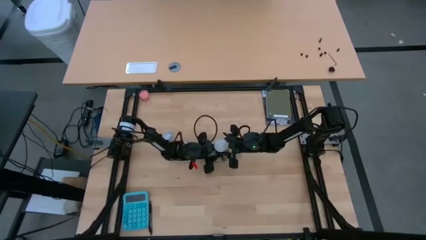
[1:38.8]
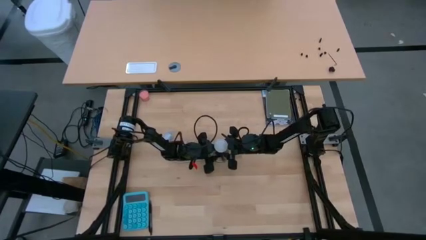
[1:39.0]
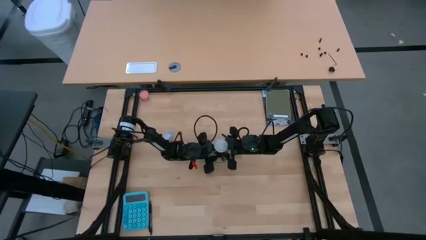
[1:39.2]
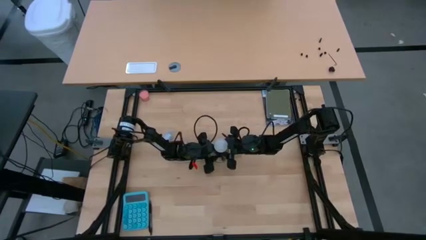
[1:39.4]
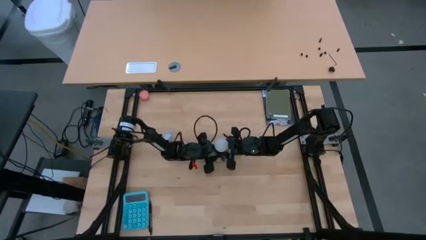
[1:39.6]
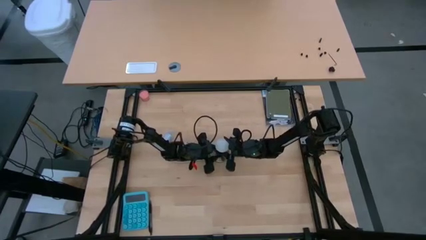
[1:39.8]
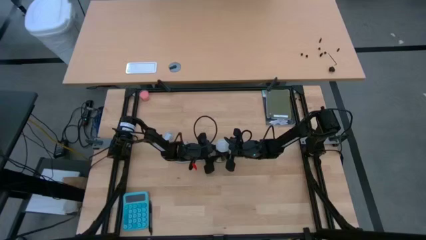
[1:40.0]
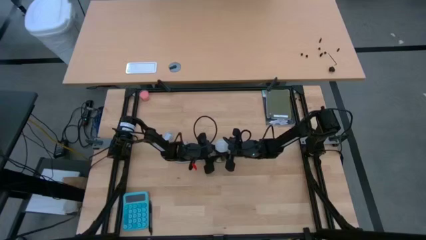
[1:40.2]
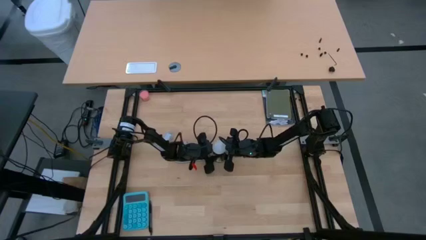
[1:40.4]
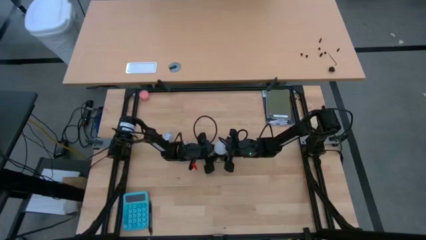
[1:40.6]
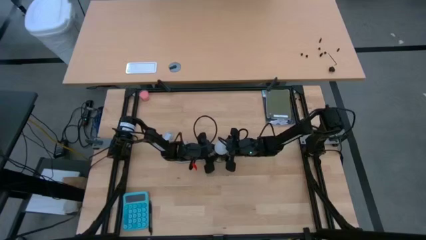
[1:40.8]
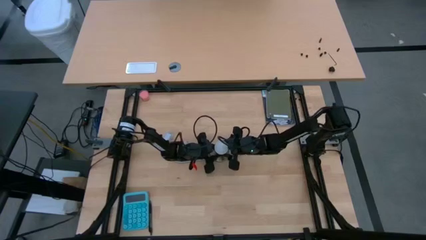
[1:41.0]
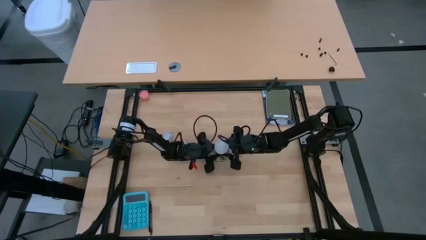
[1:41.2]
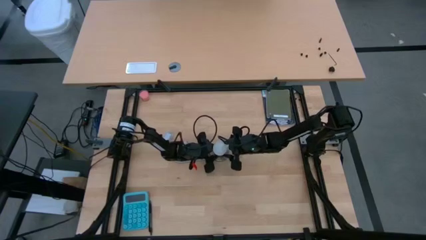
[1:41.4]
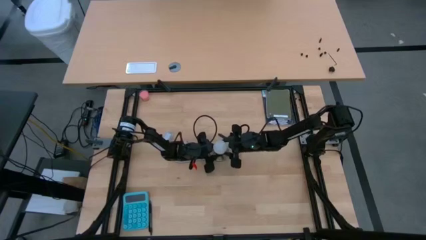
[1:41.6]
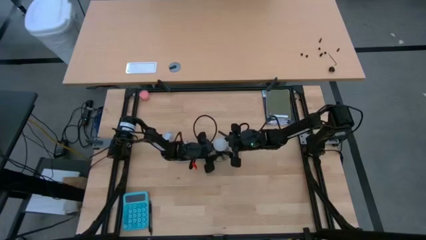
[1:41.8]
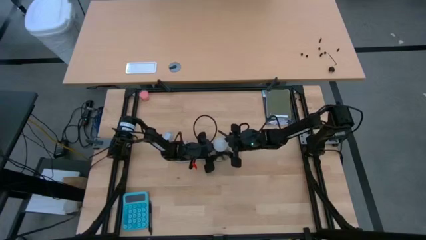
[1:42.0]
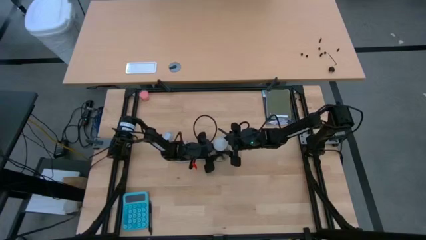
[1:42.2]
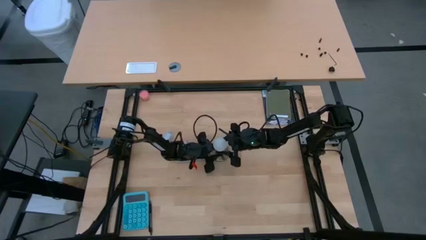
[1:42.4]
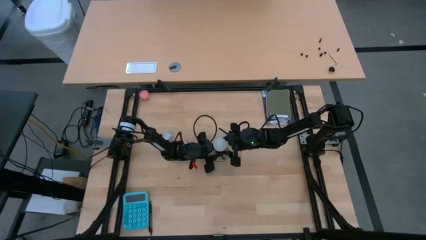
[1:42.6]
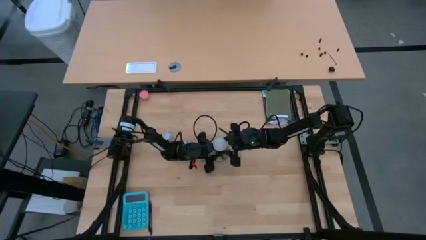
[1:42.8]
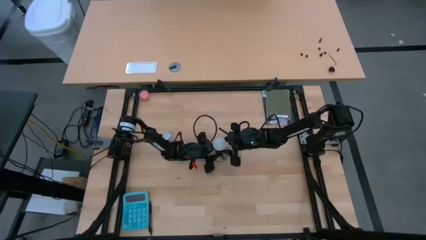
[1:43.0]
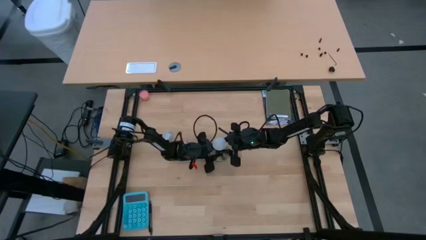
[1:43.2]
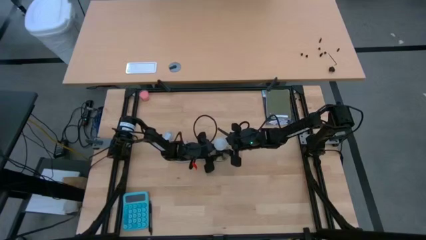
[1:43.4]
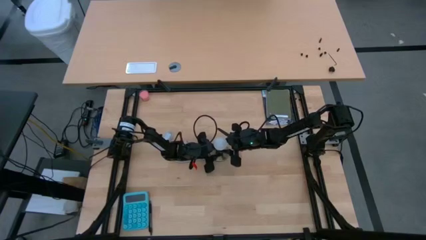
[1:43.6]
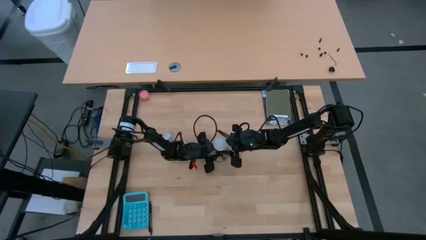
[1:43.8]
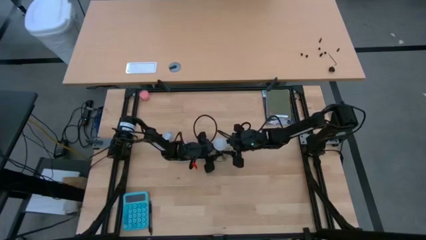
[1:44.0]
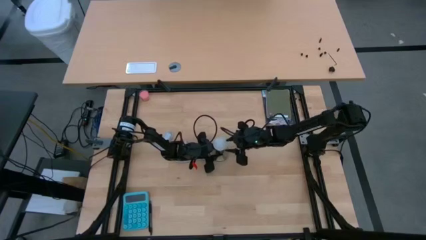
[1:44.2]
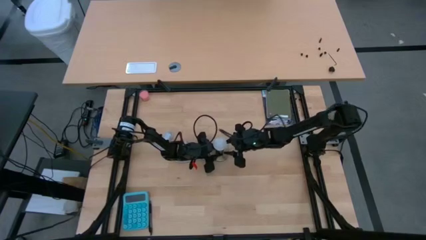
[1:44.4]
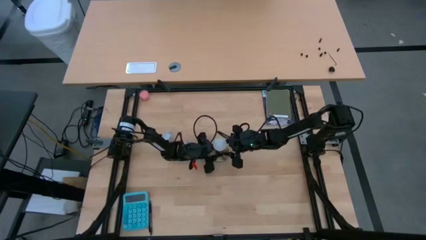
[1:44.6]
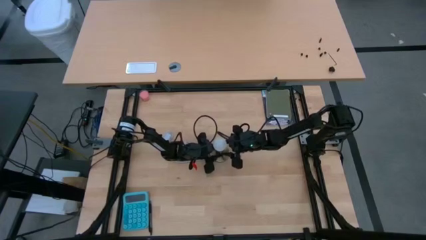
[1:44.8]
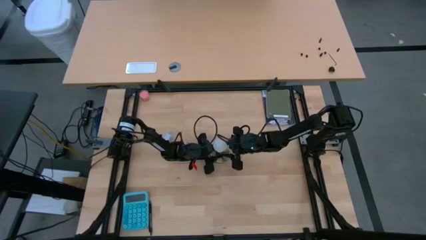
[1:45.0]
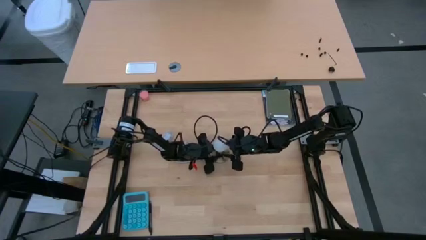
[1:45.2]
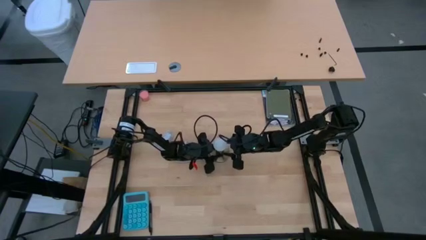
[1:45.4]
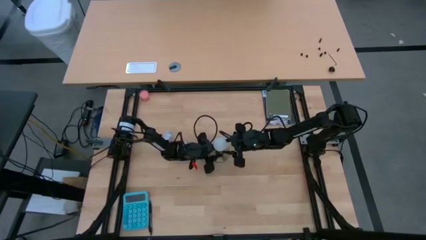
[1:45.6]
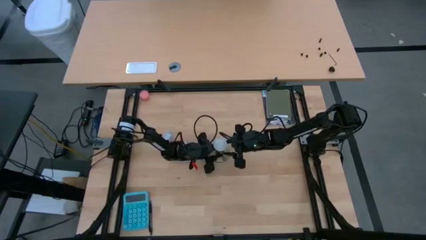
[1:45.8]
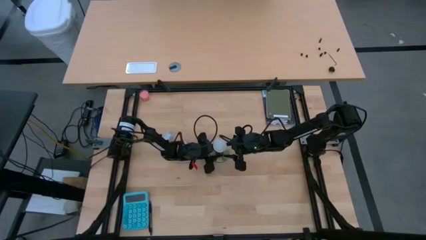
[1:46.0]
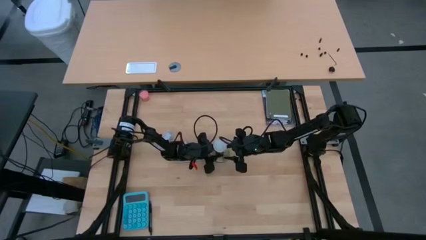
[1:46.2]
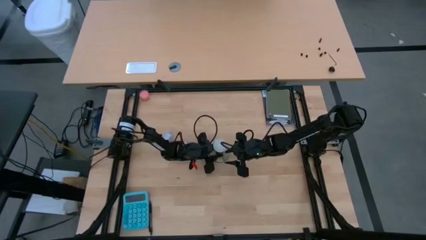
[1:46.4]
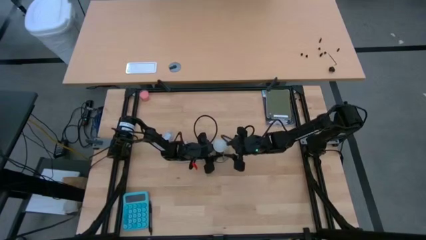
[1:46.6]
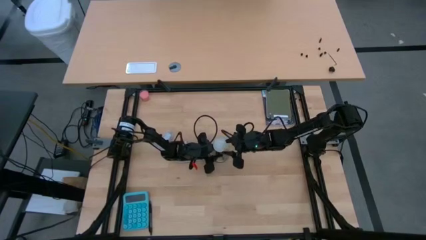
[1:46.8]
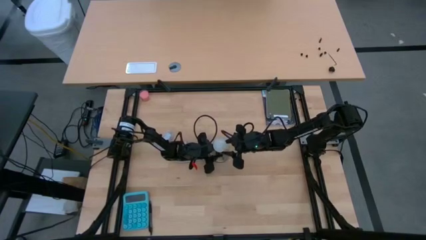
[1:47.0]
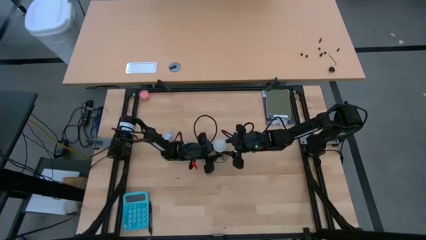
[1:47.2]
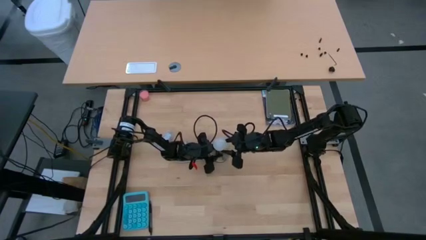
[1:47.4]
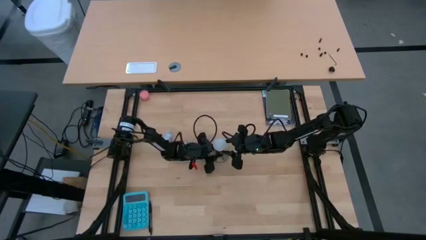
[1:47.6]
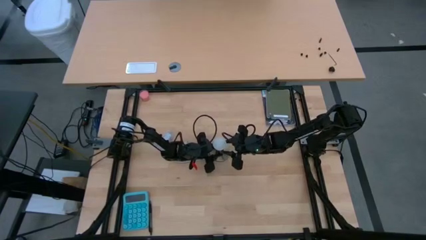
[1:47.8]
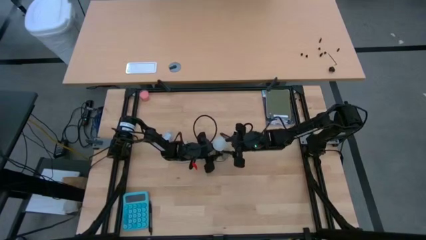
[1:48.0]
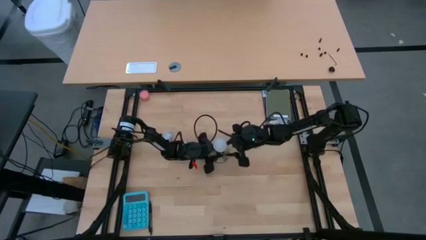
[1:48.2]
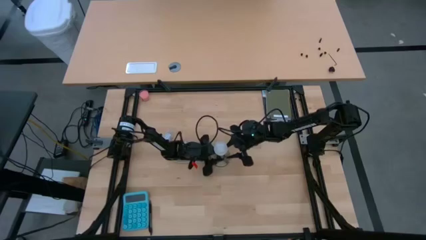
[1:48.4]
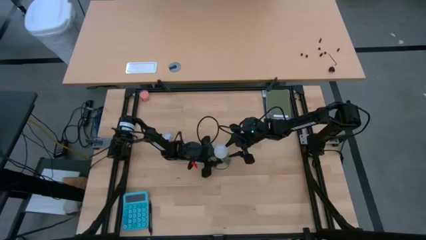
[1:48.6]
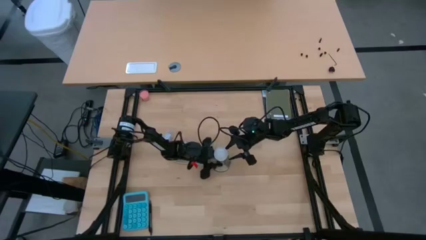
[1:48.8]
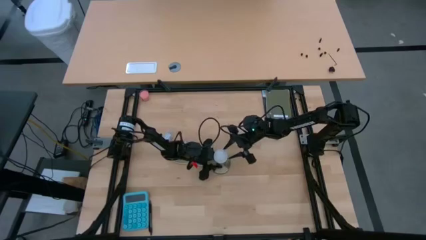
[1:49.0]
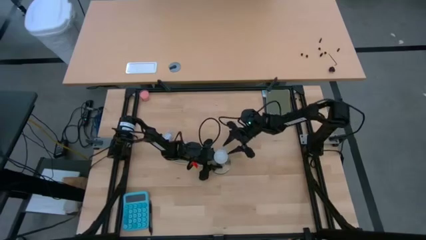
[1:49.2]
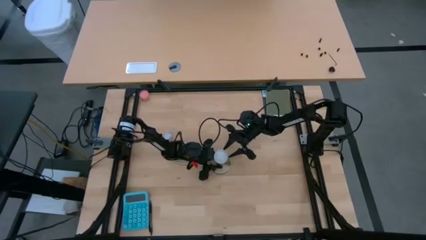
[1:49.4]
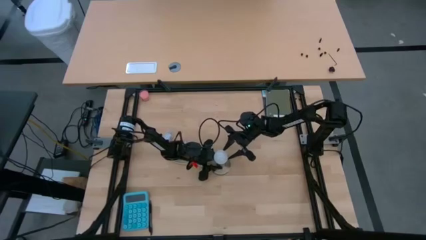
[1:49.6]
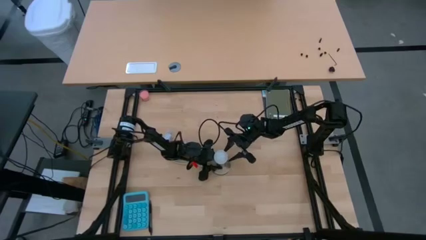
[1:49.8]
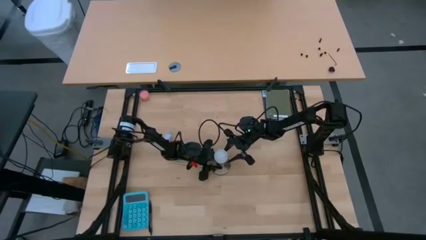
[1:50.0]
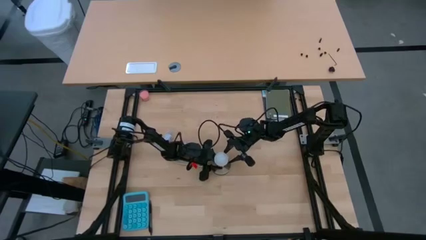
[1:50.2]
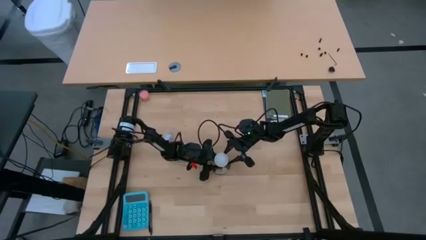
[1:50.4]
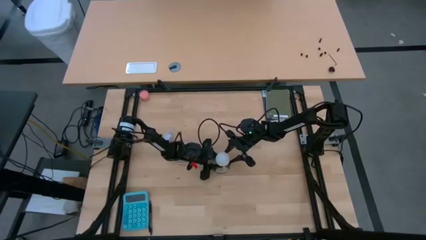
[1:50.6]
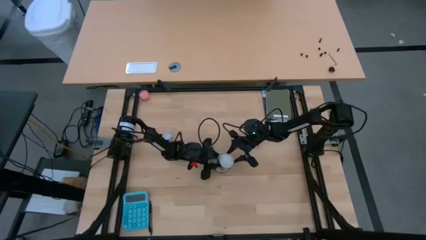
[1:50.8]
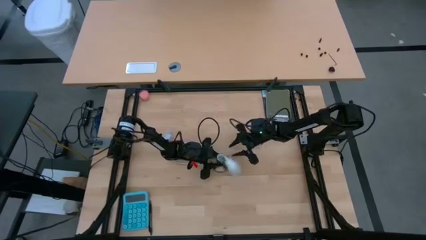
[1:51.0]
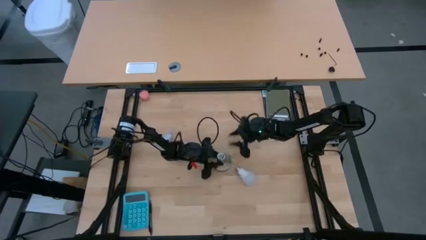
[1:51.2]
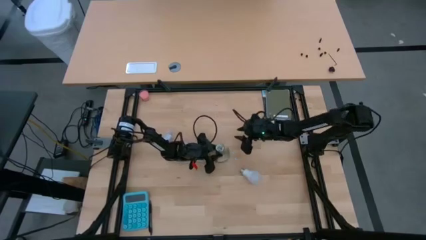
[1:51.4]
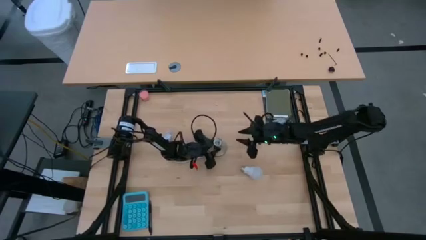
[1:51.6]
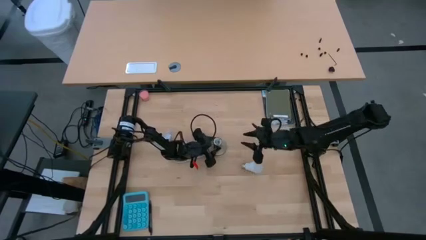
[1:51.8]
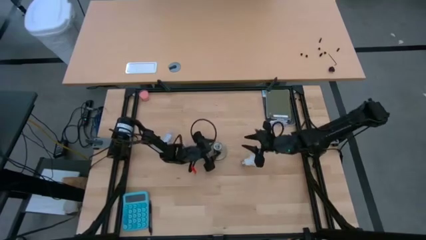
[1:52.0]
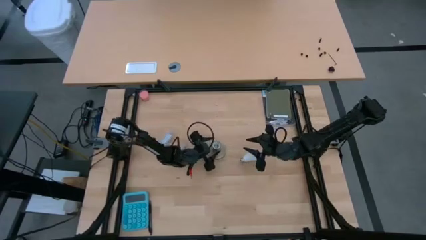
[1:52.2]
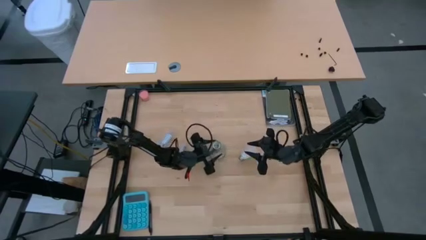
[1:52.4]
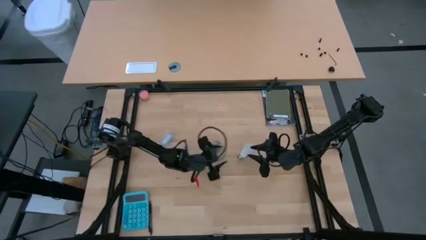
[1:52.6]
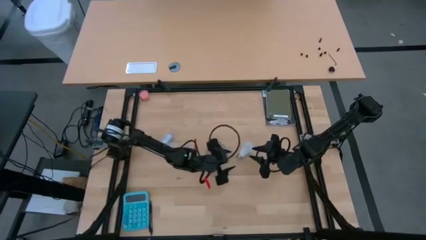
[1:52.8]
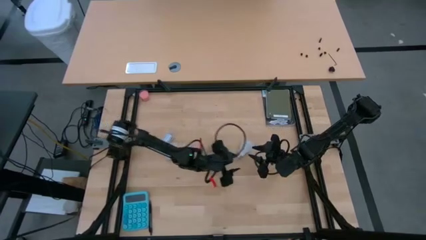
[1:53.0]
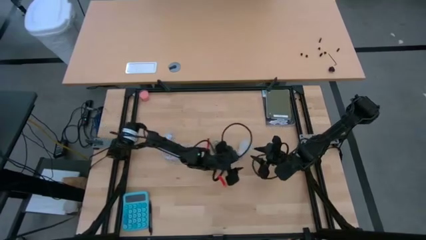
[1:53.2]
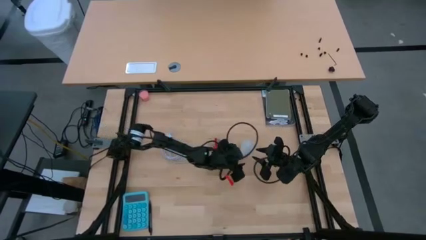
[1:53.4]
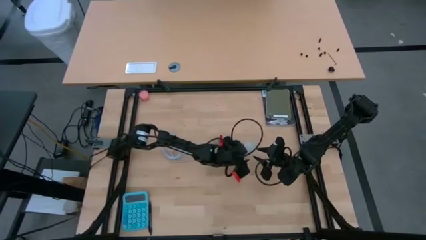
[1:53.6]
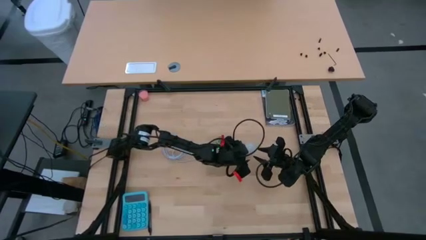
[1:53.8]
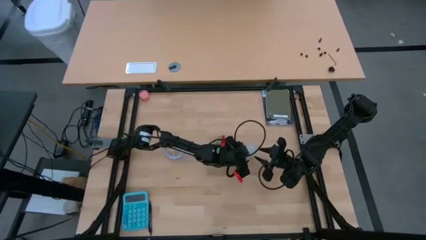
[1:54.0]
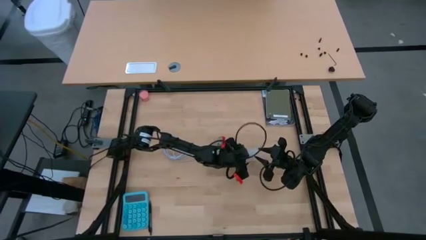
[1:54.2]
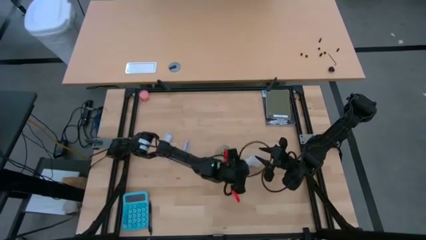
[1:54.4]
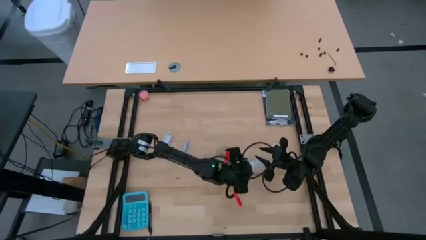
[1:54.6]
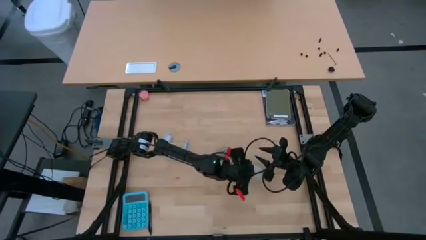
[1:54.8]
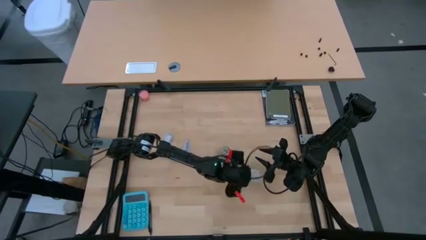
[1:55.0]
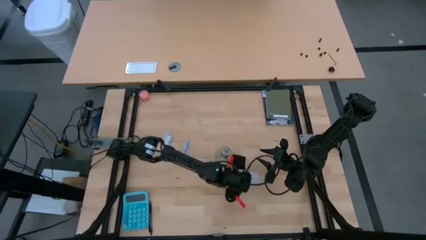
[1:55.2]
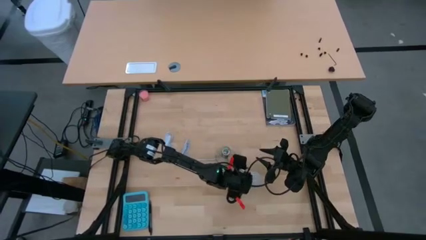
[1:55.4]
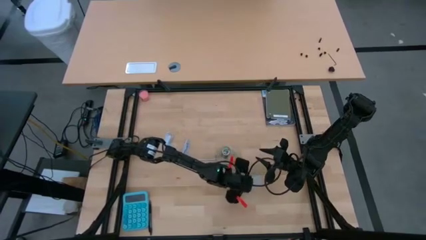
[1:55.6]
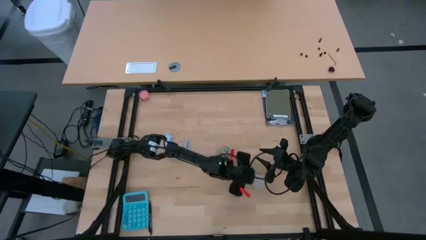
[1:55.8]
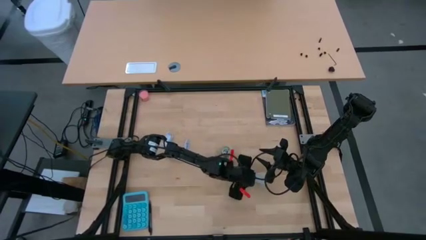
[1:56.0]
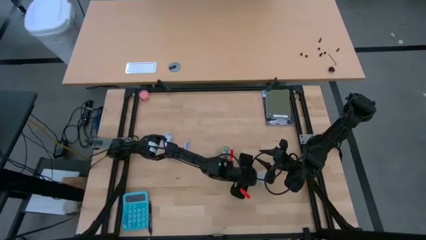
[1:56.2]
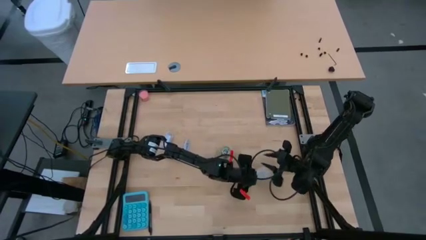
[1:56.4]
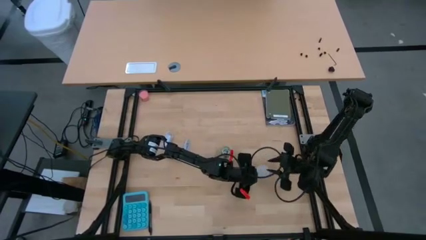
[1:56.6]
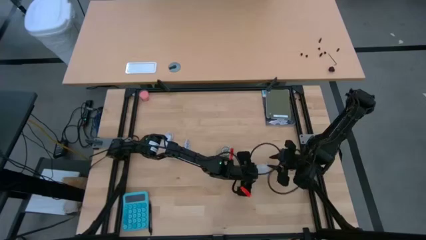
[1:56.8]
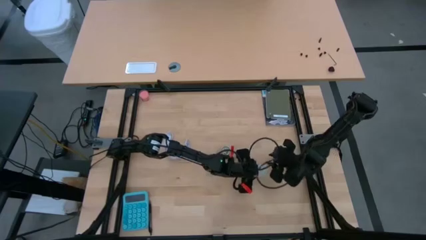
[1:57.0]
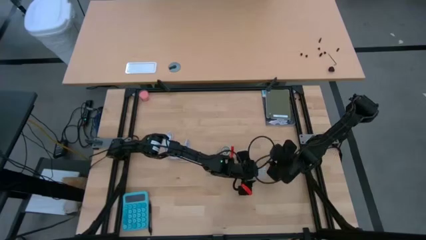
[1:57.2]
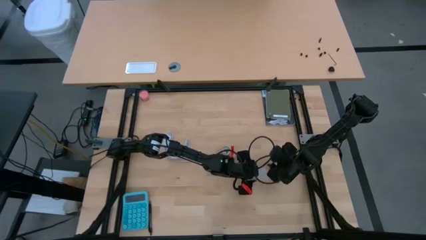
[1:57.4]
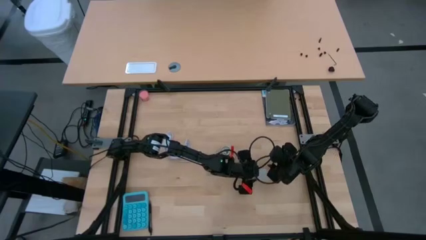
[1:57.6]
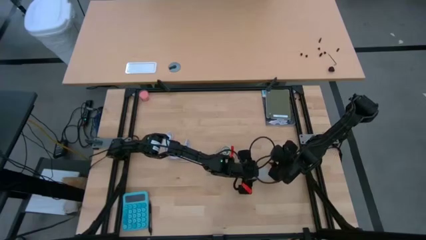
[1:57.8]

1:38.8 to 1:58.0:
Task: Screw lightbulb
Insert the lightbulb into the lamp holder
